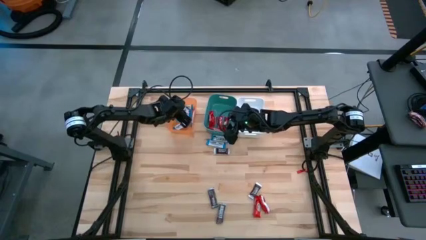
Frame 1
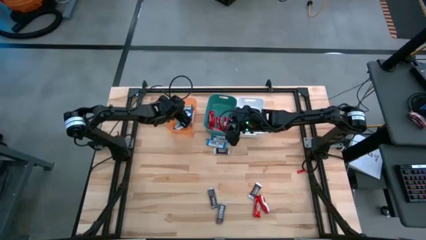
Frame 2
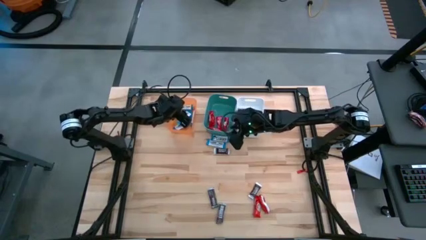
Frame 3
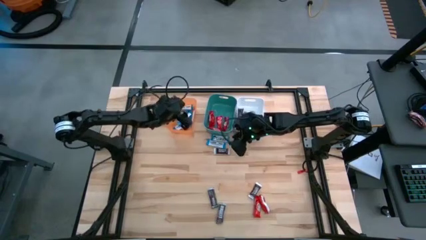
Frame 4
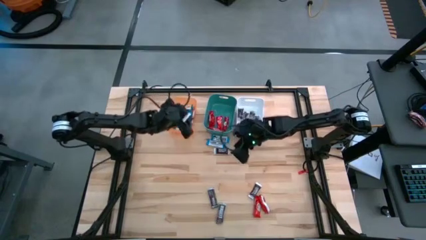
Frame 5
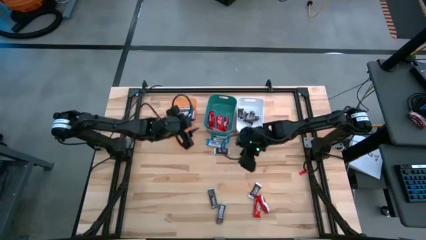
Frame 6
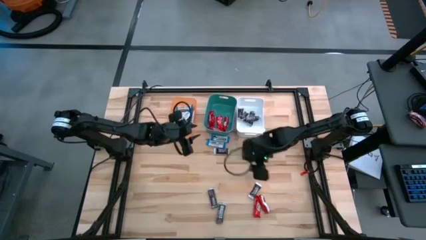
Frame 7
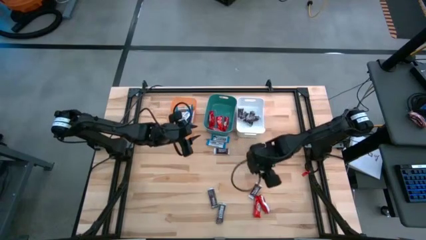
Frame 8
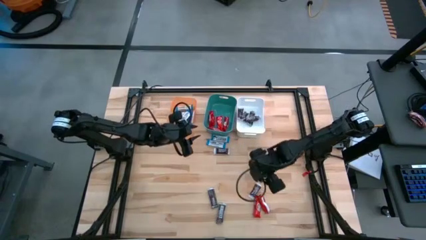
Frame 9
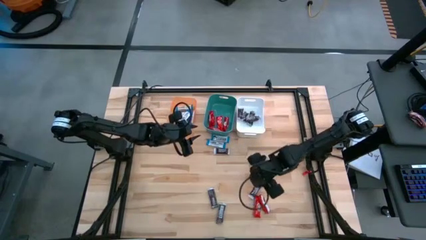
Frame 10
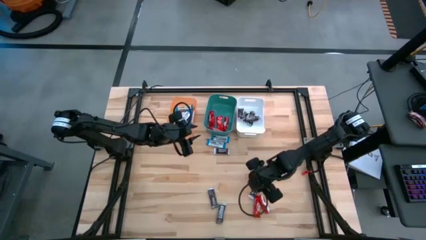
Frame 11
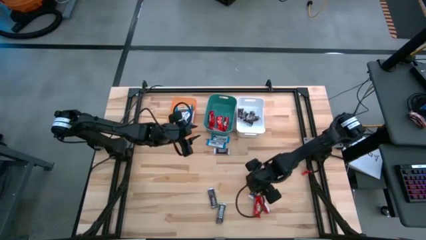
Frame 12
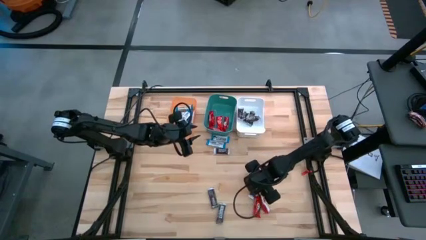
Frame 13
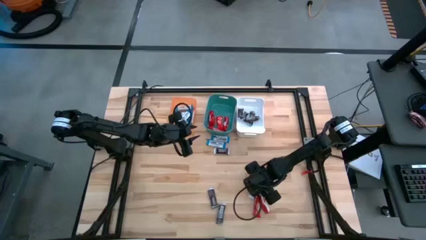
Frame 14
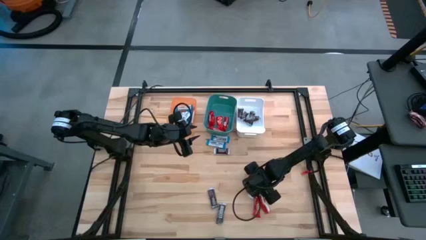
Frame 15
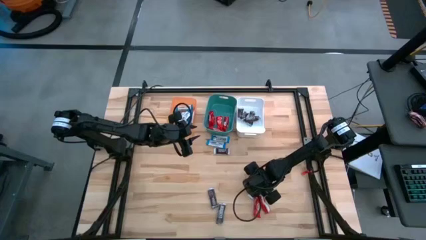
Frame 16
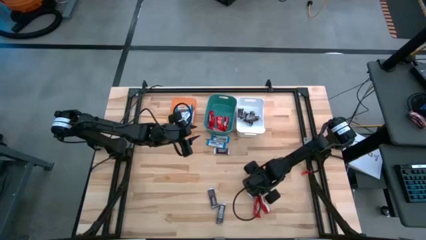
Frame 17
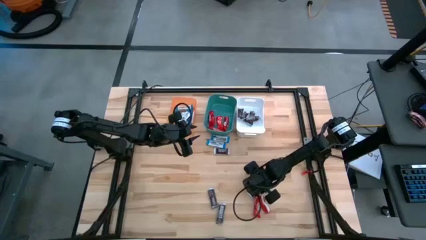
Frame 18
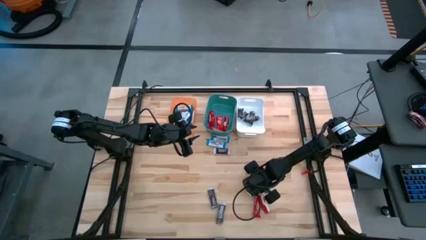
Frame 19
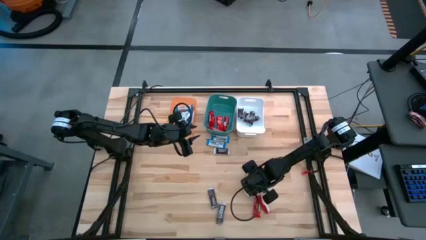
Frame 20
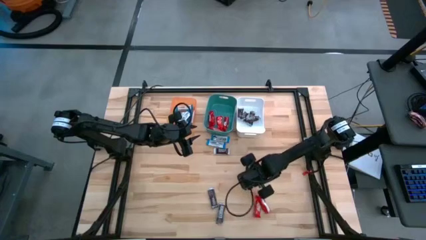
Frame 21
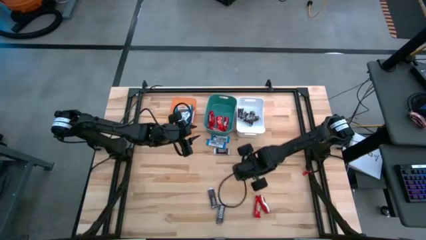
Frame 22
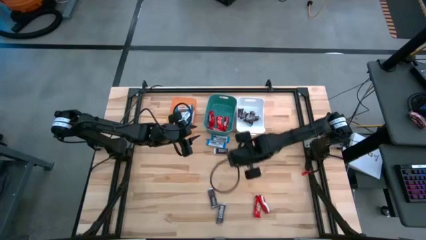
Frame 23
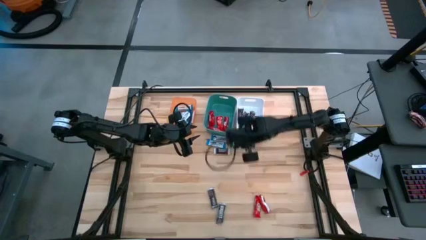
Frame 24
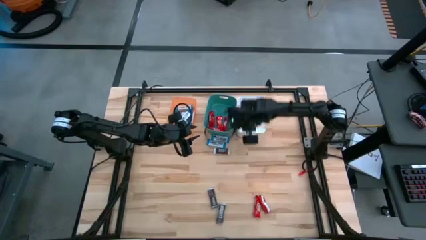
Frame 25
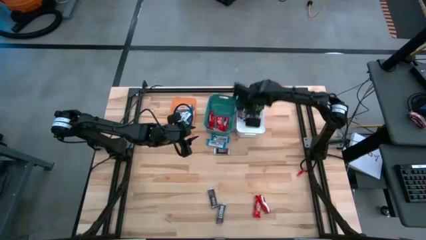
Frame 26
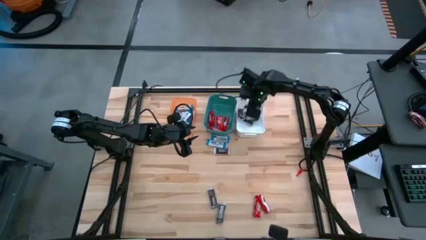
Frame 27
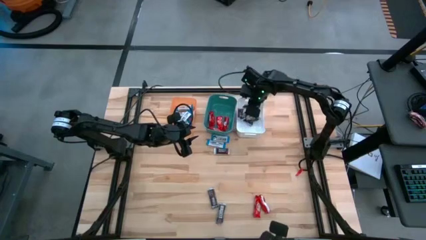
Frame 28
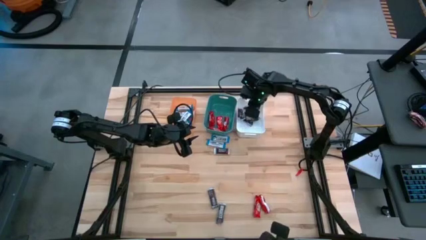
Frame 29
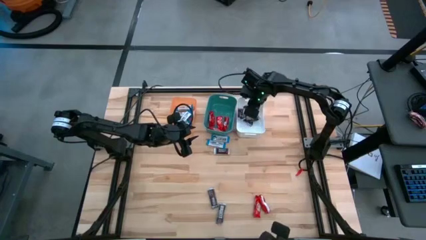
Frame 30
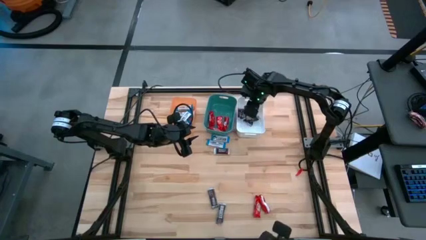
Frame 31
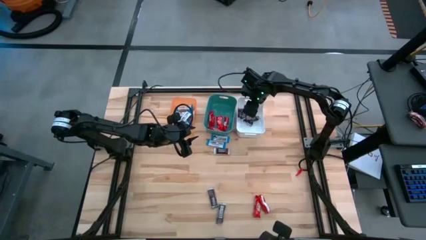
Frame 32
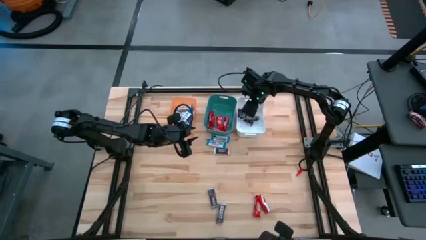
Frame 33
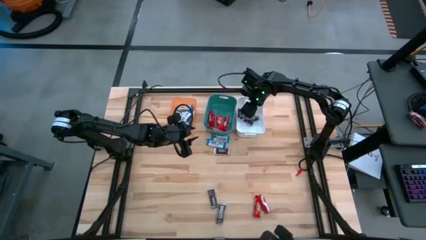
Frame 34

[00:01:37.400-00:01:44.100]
Task: Organize candy in baskets
Put the brown chocolate into the white bin

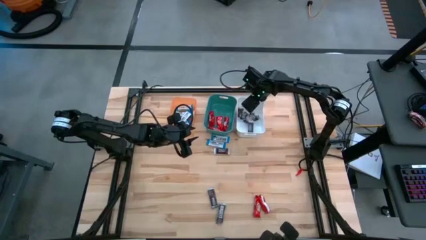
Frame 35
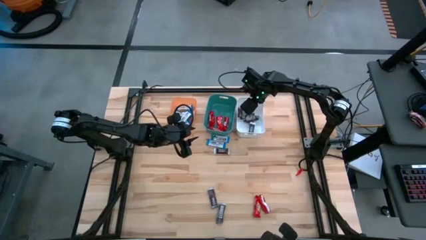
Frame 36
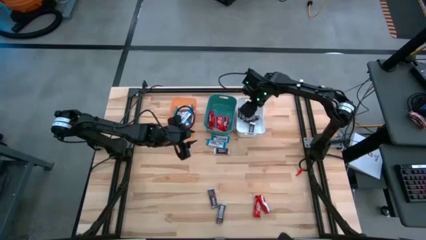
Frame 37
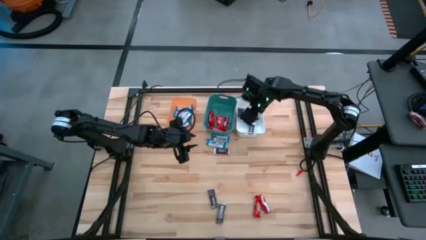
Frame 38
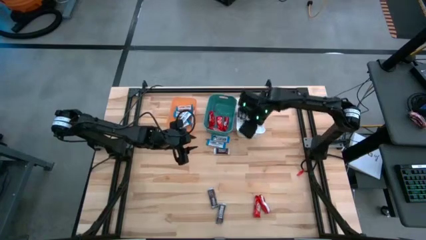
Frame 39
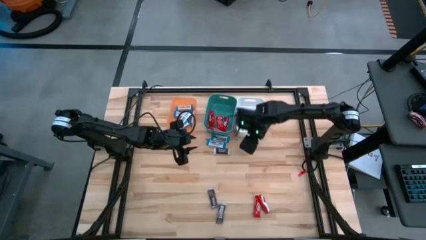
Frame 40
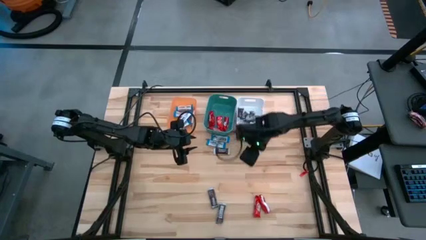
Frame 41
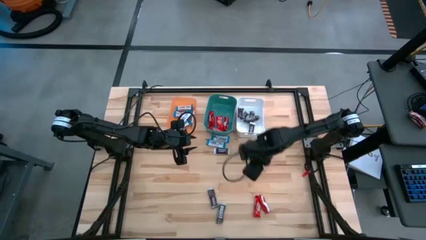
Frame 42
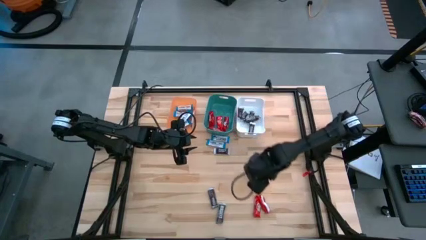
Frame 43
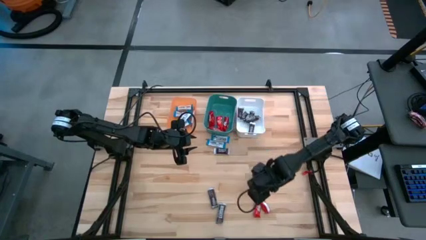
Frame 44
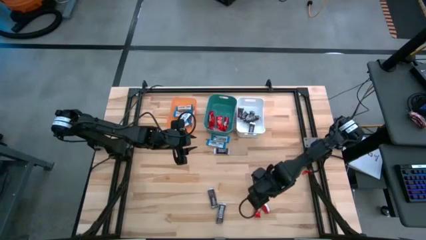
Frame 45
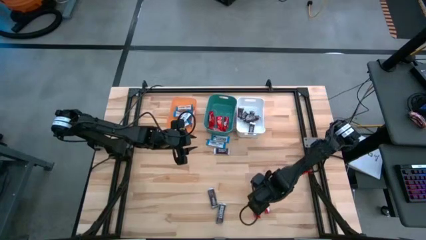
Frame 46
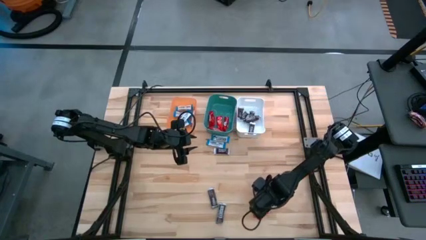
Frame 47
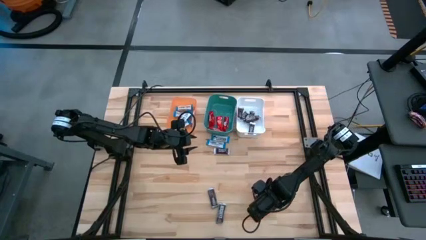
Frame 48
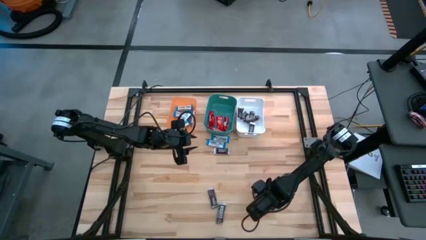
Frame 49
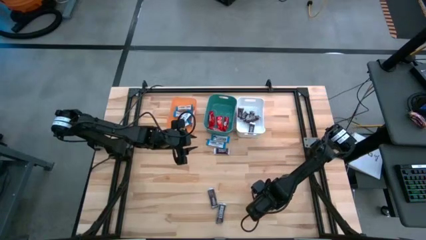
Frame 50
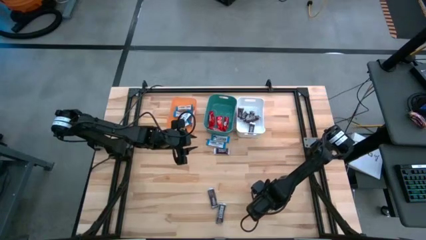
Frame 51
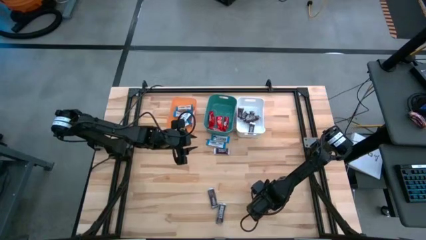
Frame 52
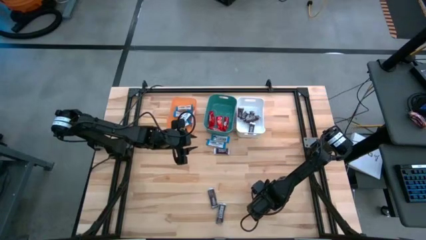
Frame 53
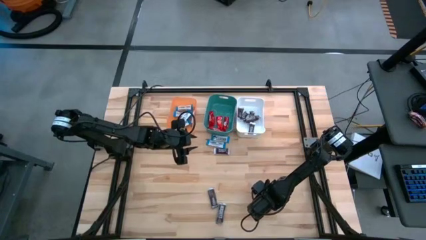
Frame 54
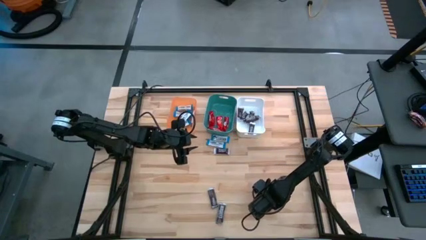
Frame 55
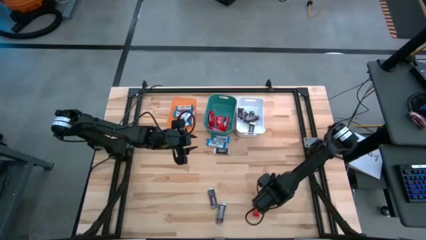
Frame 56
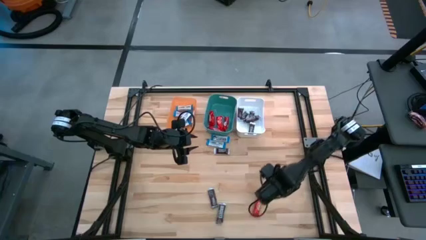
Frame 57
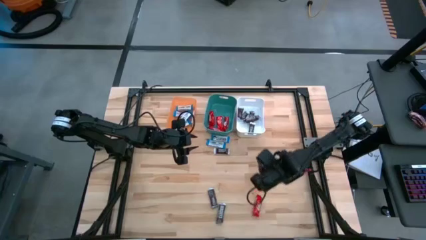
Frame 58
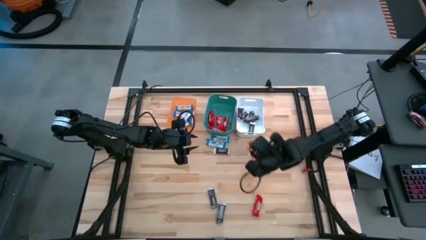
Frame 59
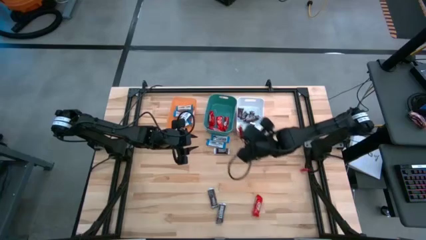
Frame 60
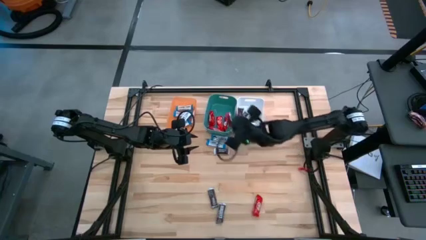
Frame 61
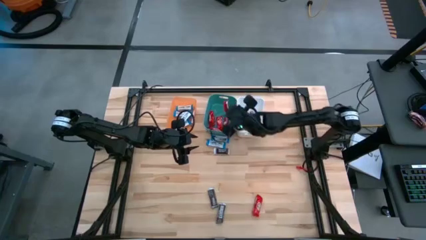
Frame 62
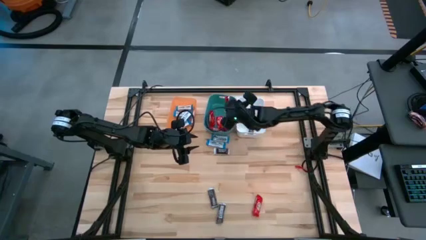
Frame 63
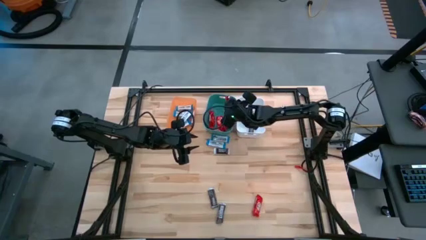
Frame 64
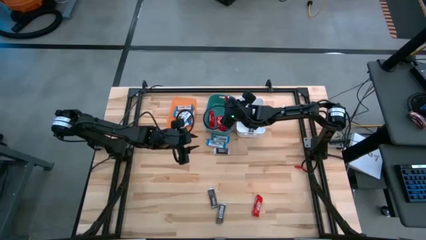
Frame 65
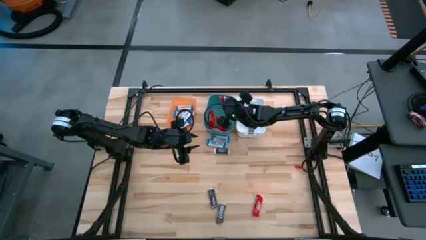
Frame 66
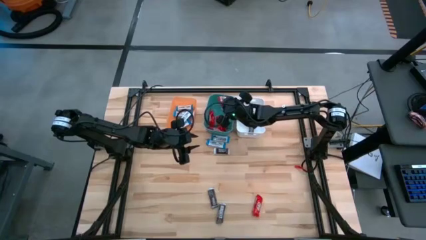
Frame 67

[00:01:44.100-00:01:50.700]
Put the red chocolate into the green bin

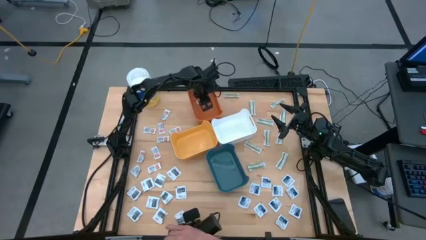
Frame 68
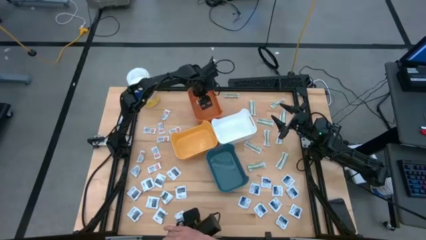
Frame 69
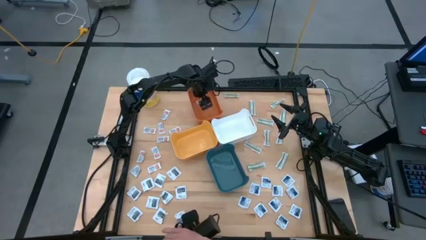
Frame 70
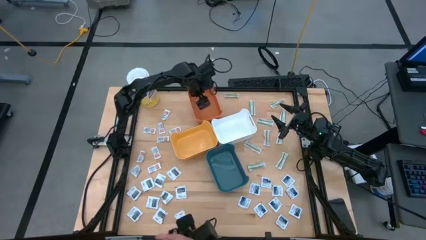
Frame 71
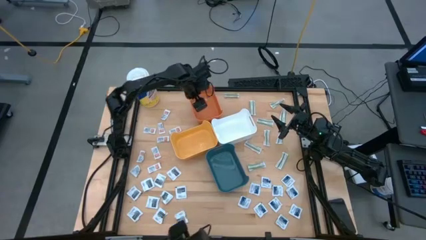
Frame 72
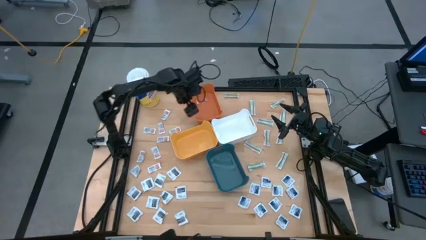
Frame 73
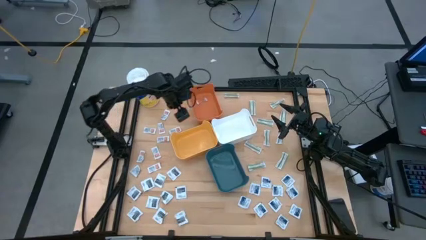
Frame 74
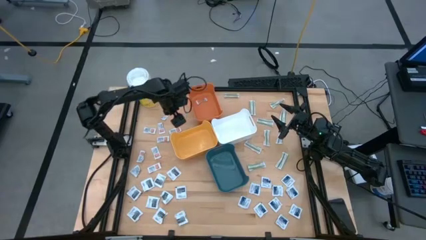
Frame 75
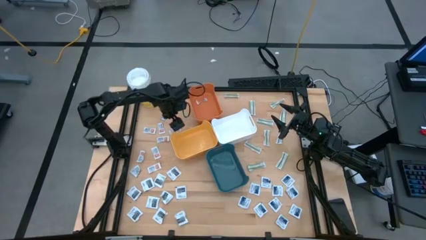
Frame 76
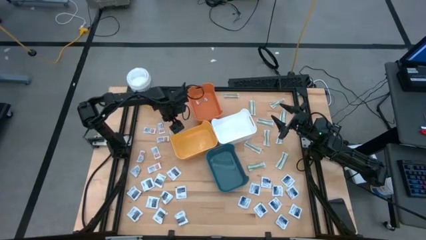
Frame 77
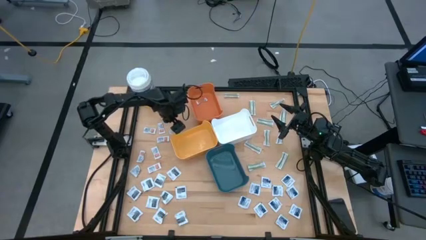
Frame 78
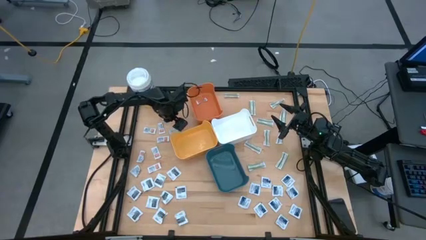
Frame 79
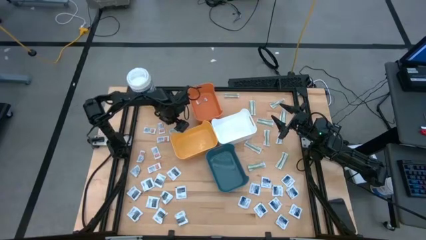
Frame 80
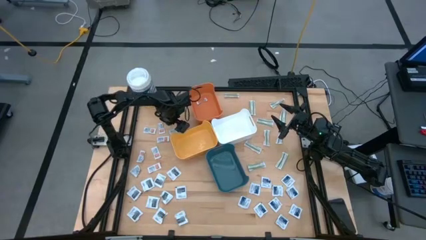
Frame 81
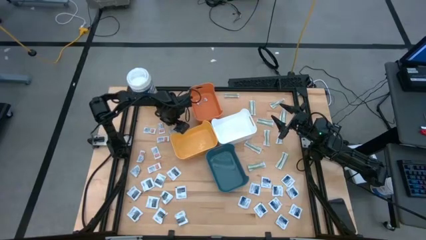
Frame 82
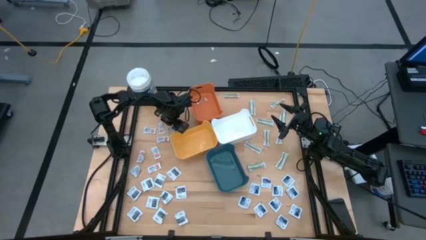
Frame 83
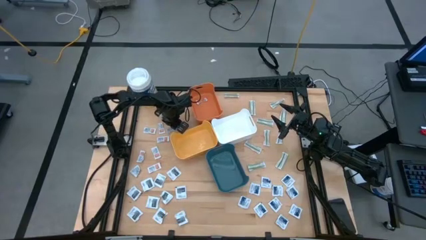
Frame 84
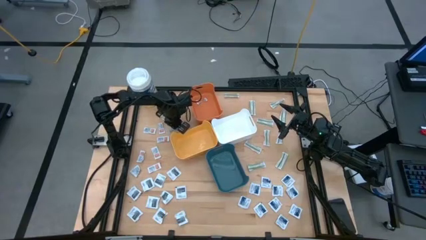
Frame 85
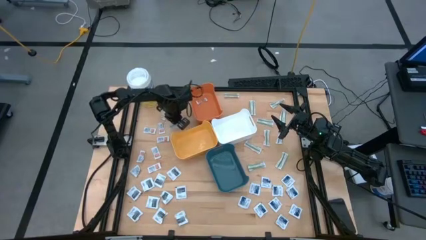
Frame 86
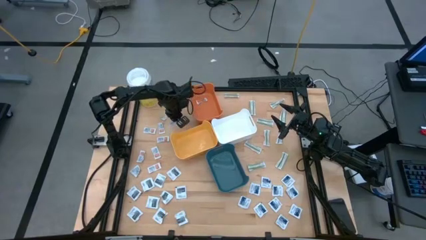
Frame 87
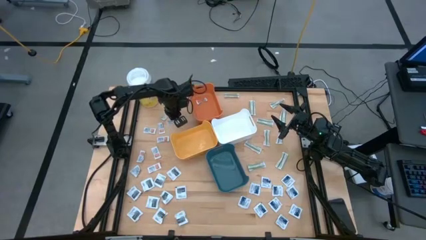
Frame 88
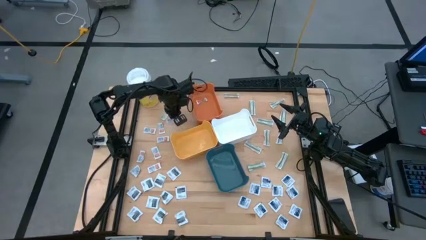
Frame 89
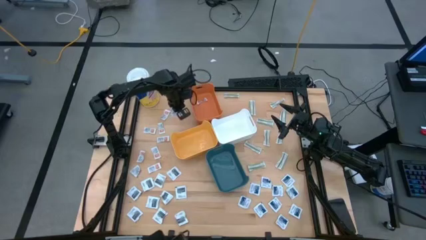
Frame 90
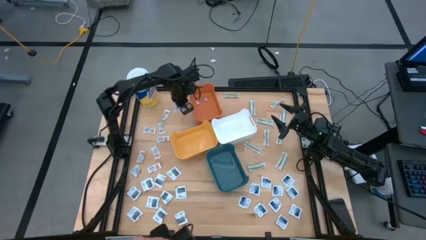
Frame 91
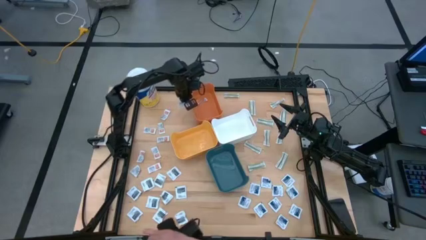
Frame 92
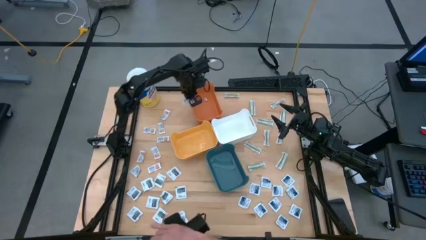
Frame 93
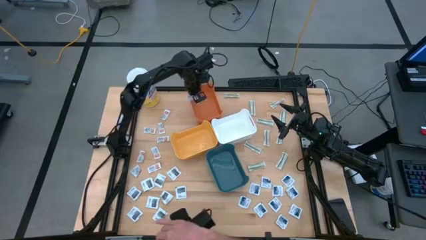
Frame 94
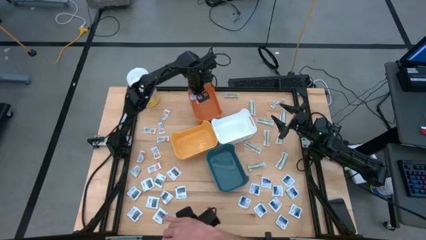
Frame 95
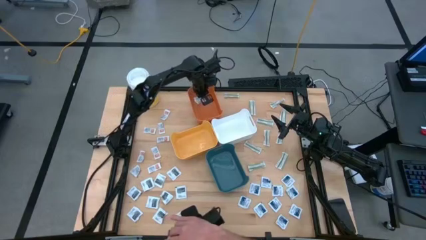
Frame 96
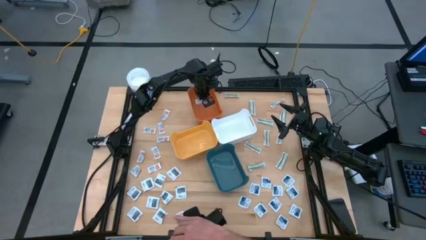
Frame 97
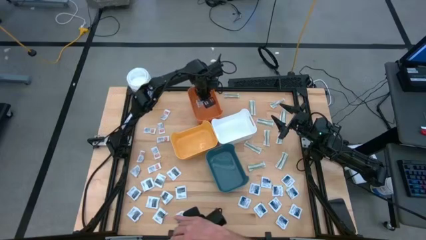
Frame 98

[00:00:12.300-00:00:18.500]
Task: Pick & Place First Aid Supplies
Put the orange ointment pack into the orange bin
